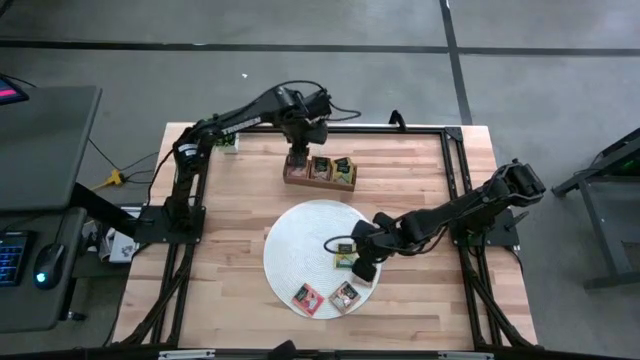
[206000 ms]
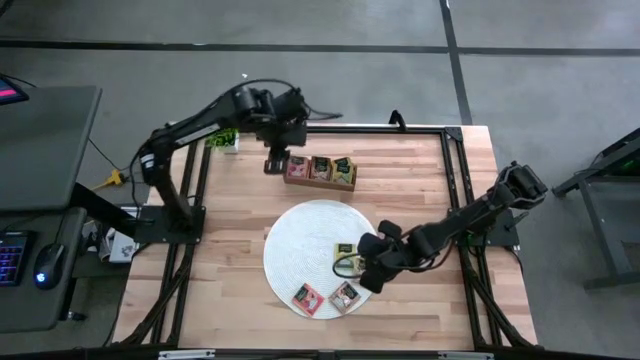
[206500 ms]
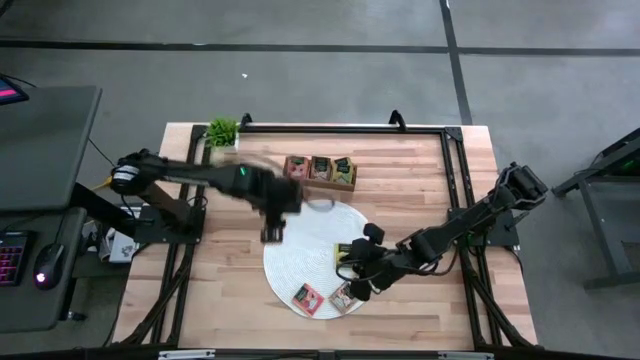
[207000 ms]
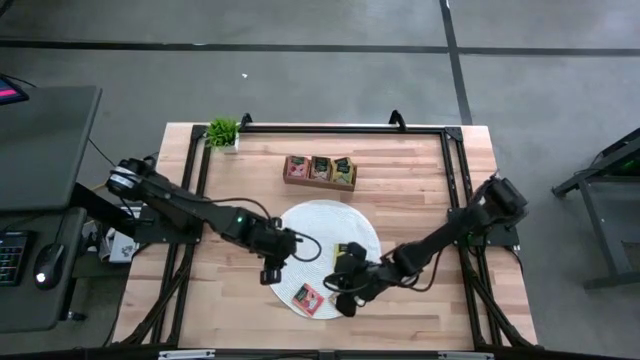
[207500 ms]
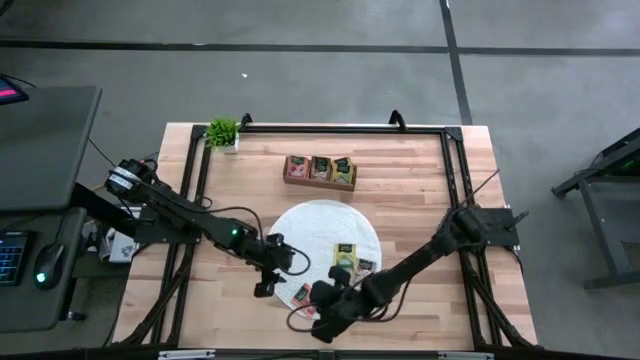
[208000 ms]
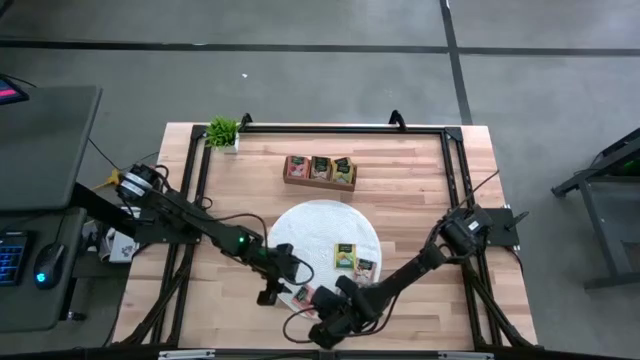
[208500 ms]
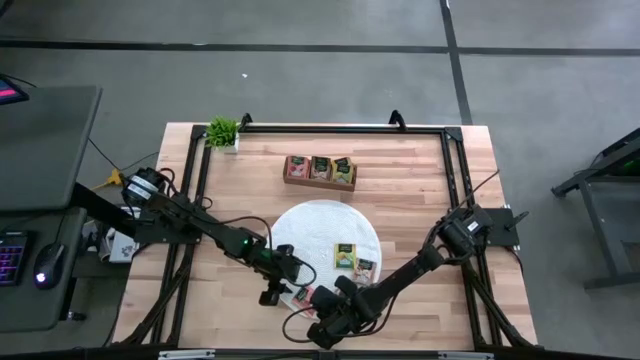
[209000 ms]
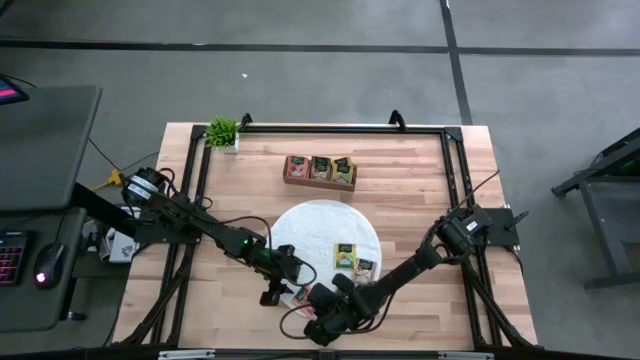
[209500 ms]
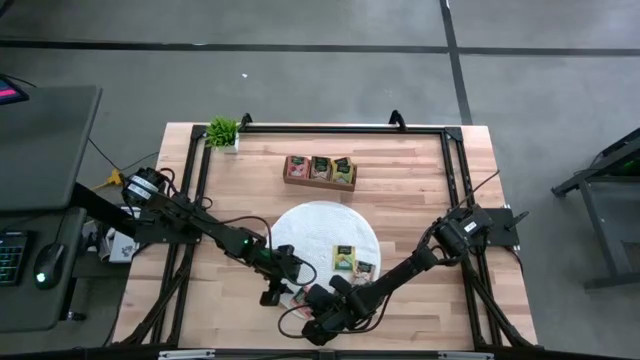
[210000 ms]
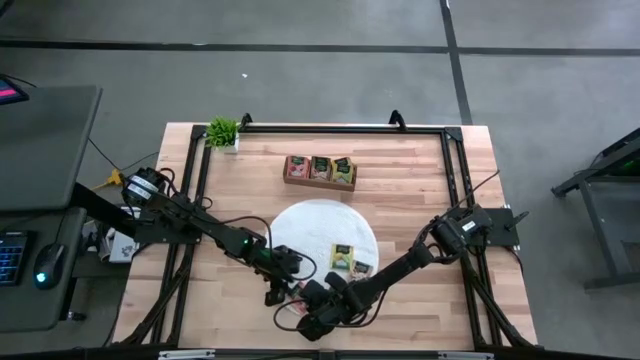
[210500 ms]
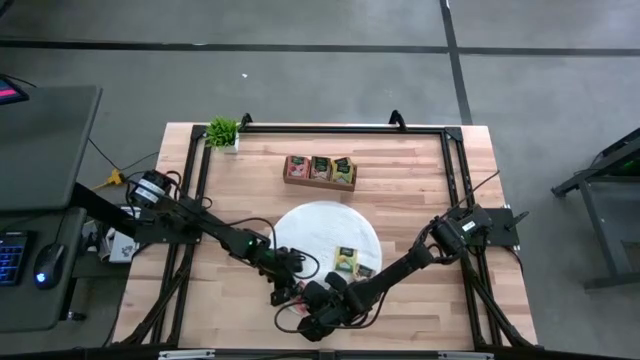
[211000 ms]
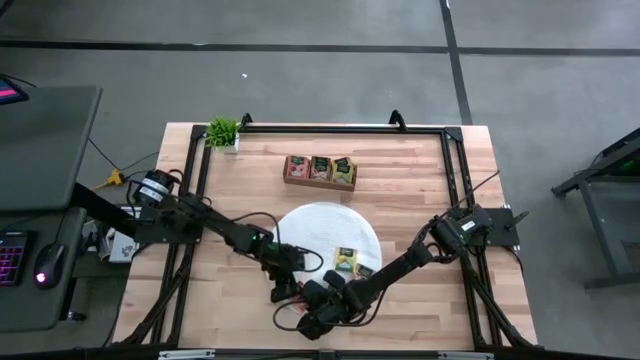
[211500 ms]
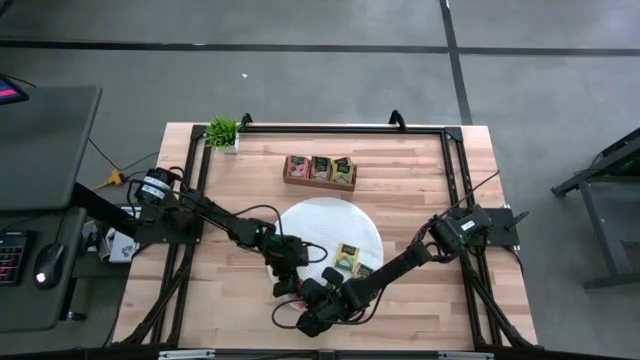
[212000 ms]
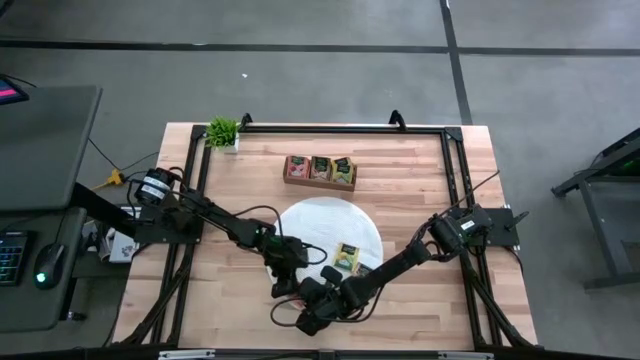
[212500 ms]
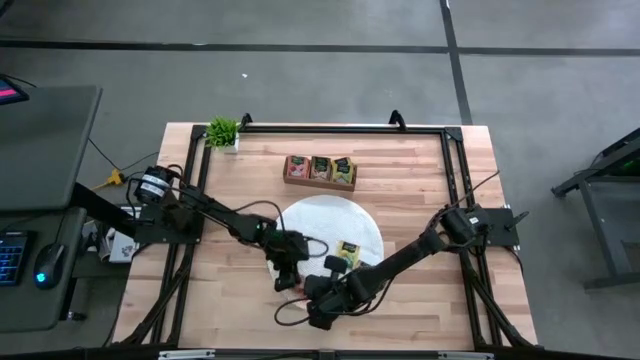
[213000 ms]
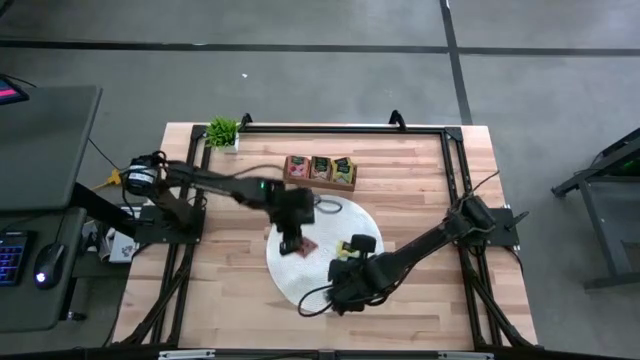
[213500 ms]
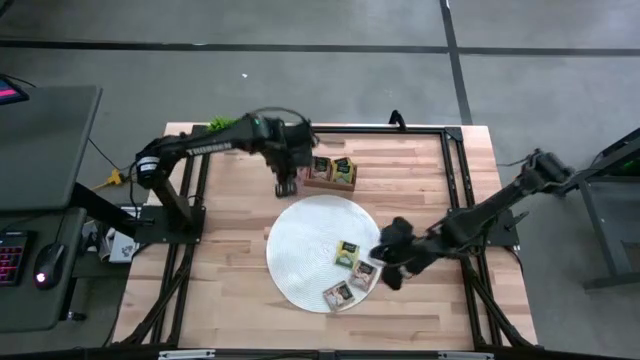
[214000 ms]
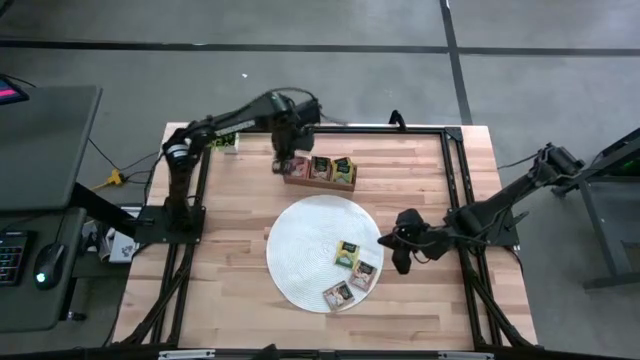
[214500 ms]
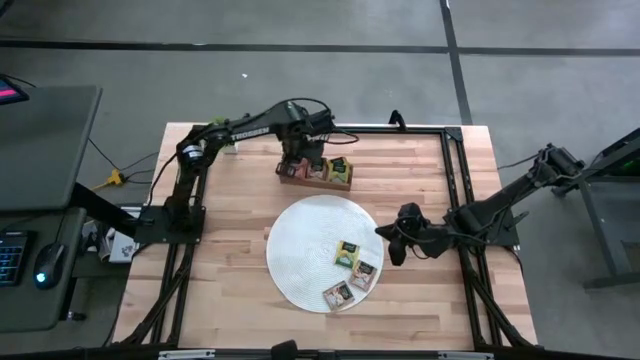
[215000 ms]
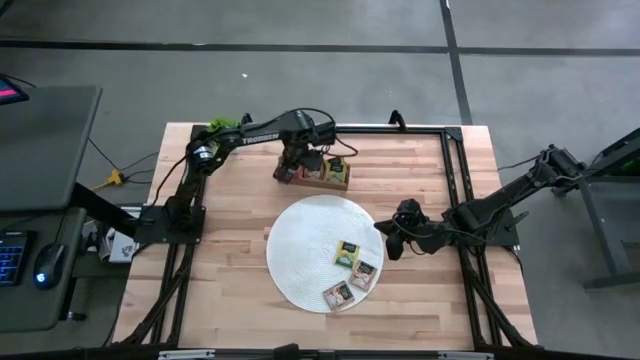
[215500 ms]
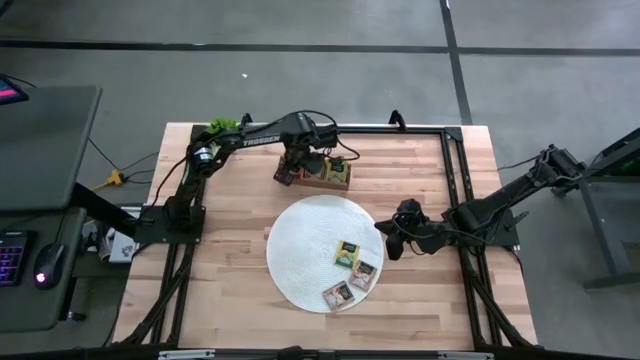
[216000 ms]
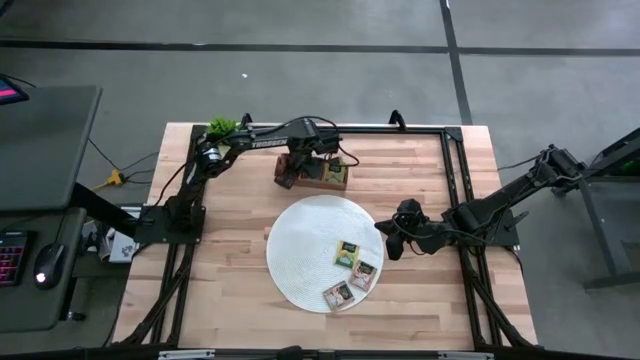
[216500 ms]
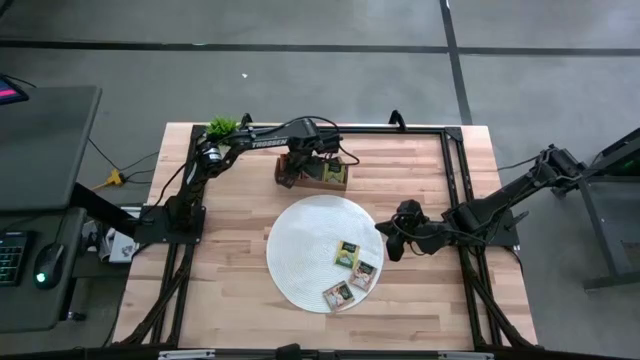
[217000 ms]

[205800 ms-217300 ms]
Task: Pick & Place Tea
Put the orange tea bag into the left section of the wooden organizer

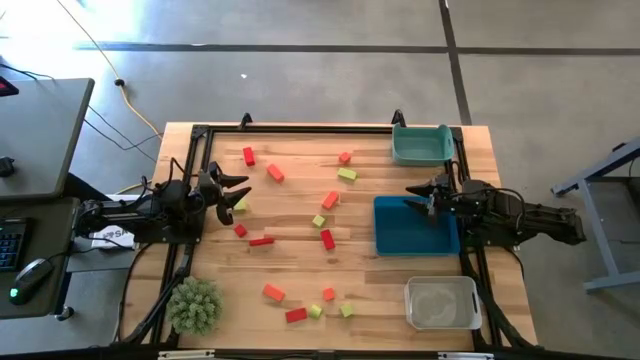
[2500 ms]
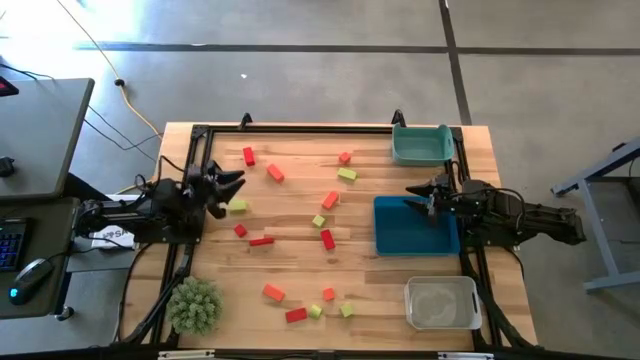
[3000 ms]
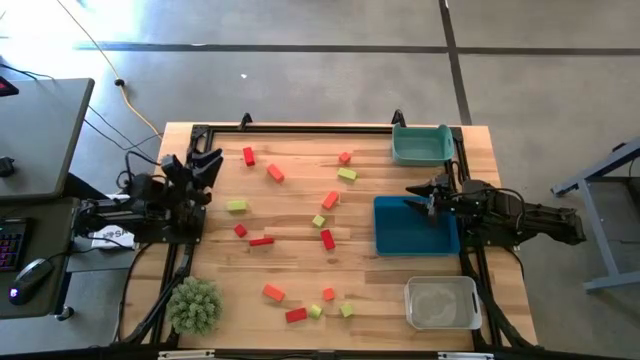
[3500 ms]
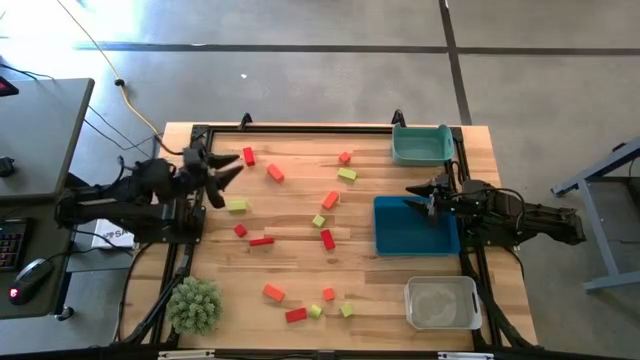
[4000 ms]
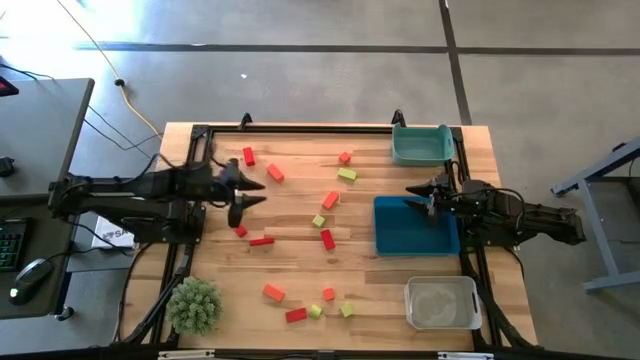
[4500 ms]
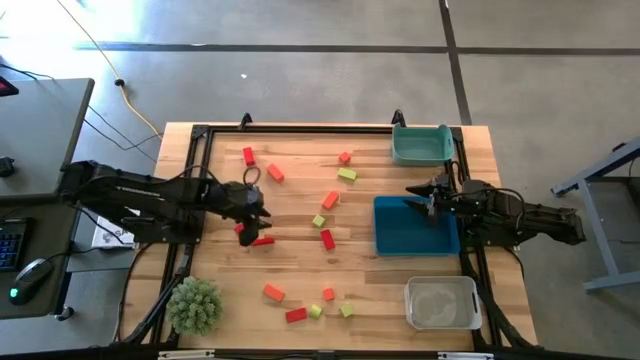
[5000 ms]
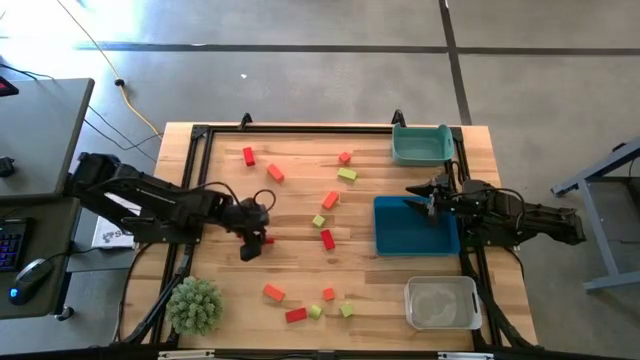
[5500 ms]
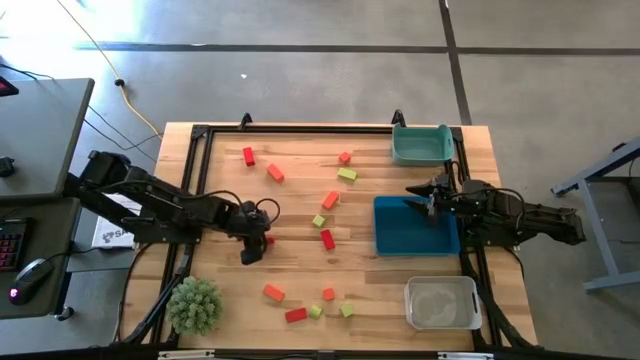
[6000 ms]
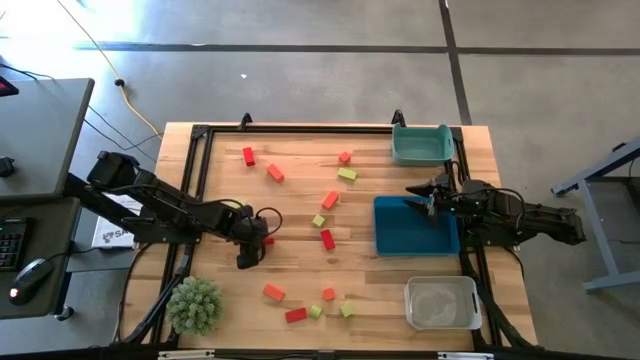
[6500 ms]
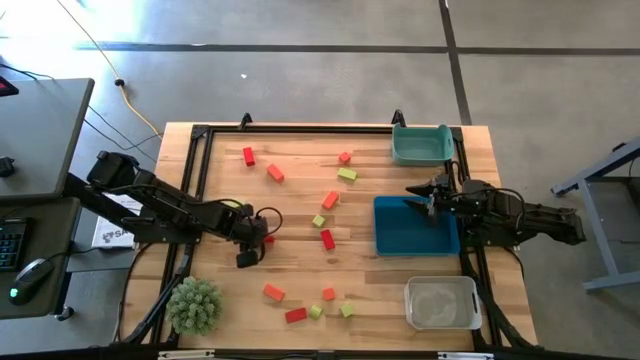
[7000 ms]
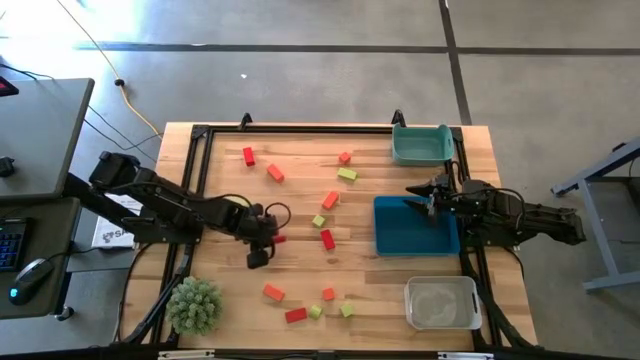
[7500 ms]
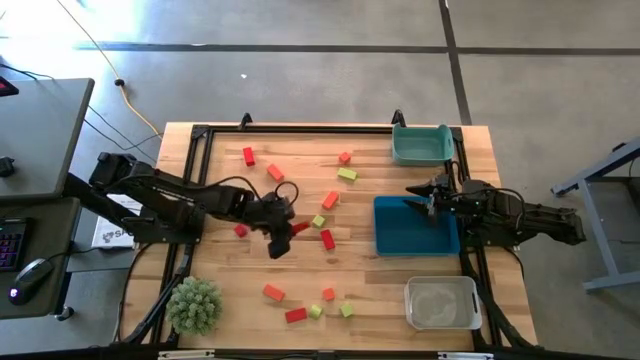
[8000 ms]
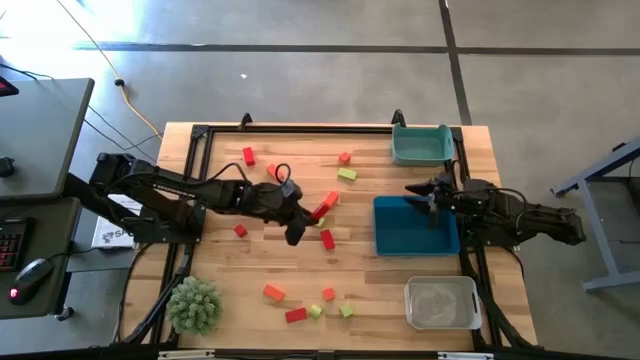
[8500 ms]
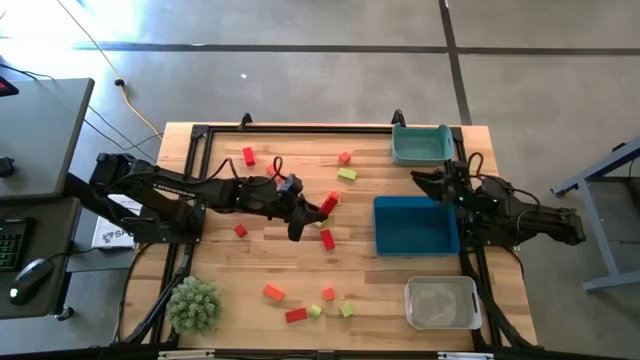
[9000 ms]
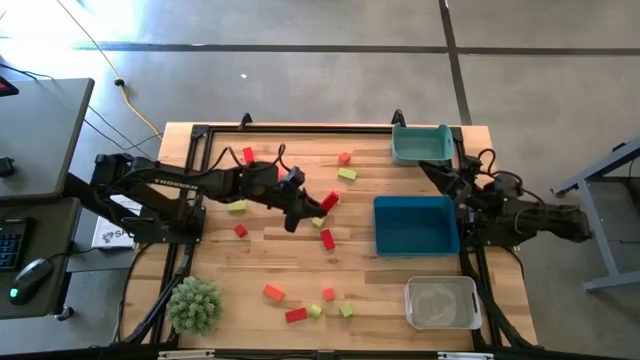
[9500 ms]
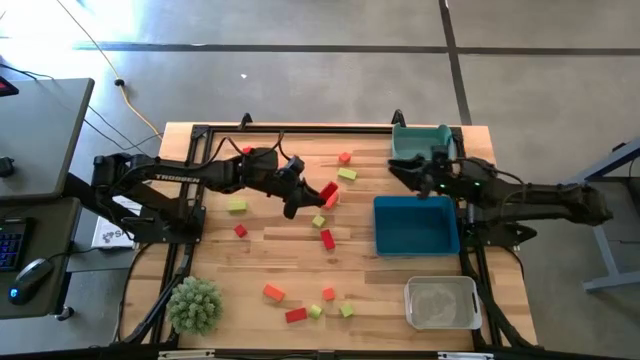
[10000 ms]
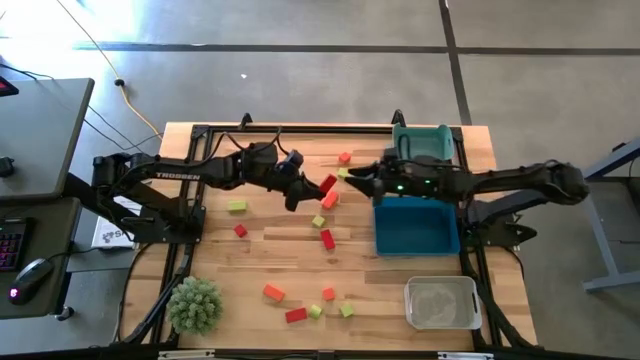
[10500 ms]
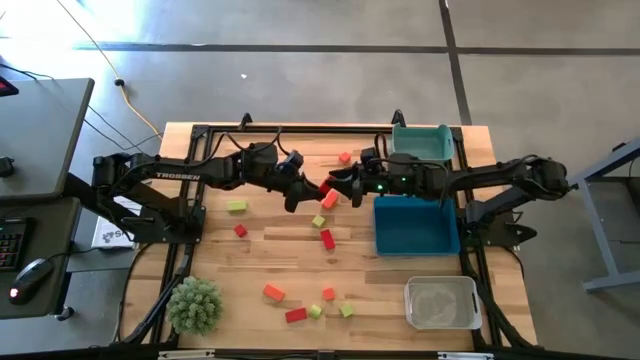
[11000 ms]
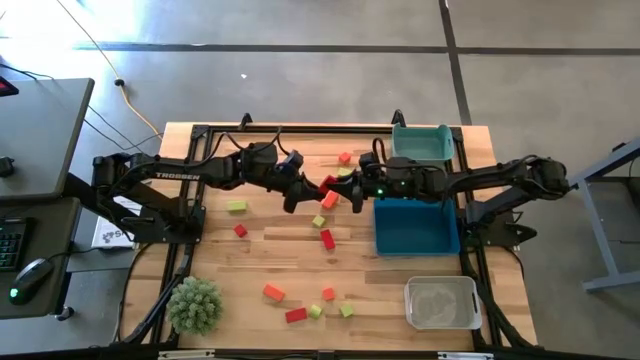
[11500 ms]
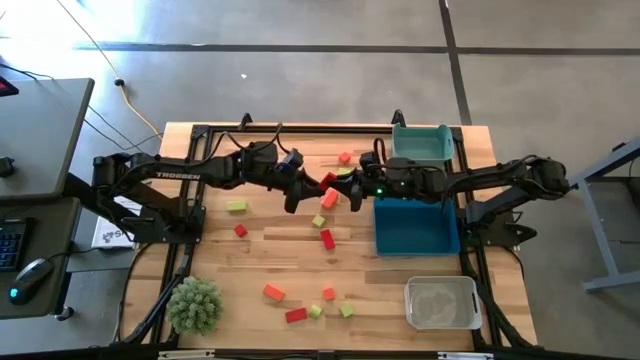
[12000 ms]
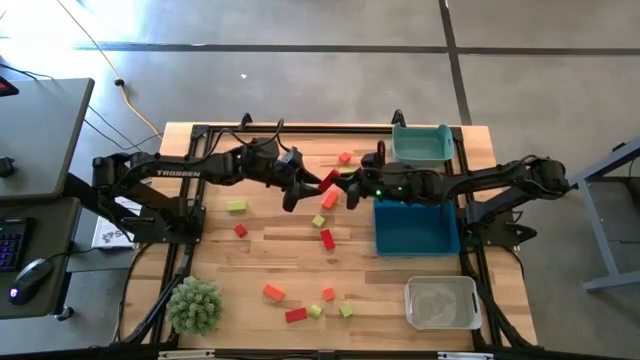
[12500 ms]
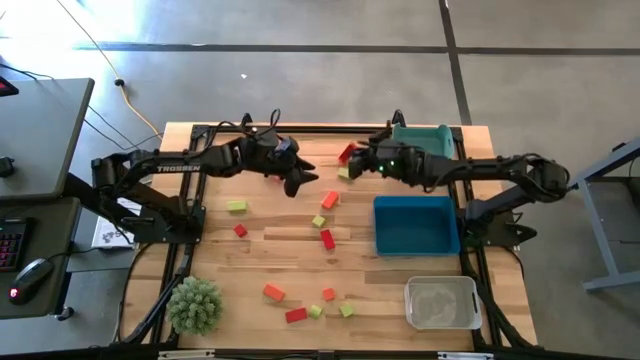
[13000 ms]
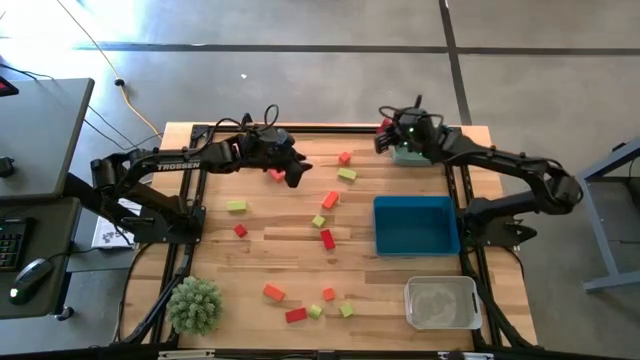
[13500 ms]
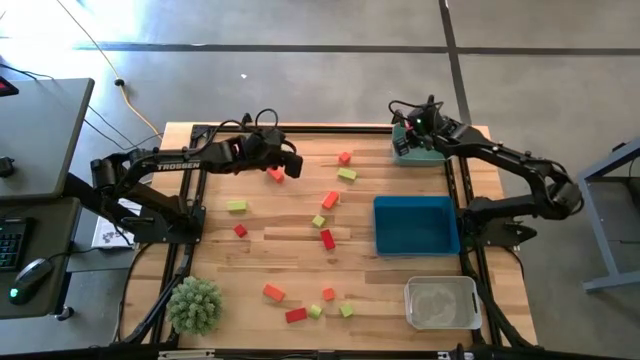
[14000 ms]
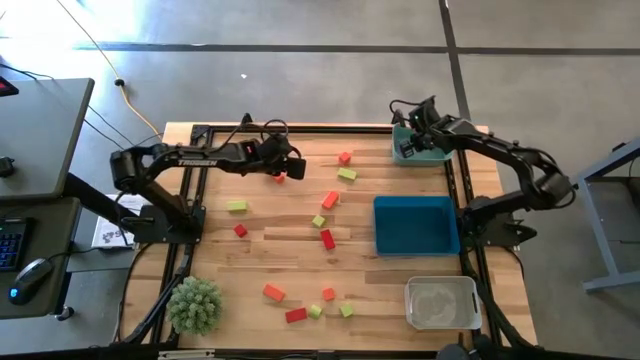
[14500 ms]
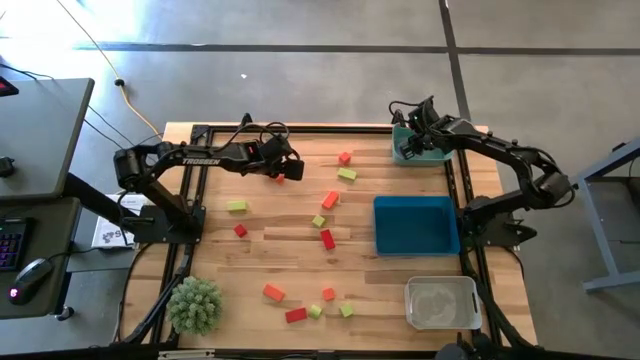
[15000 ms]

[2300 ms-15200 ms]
Task: Sort & place blocks by color
Put the red wooden block into the green bin
